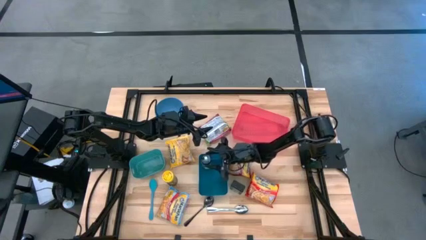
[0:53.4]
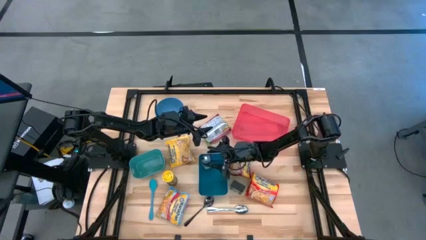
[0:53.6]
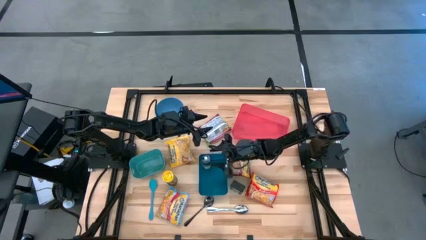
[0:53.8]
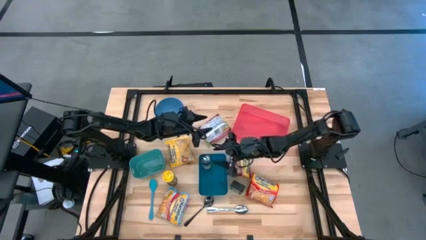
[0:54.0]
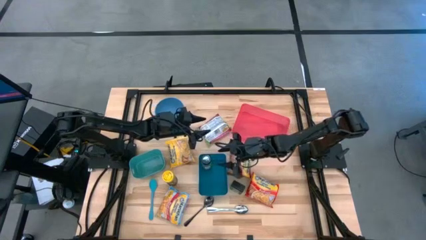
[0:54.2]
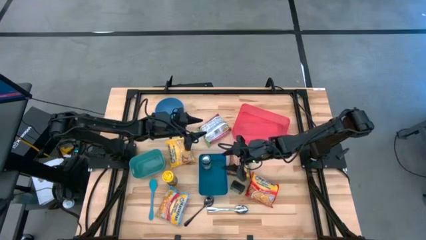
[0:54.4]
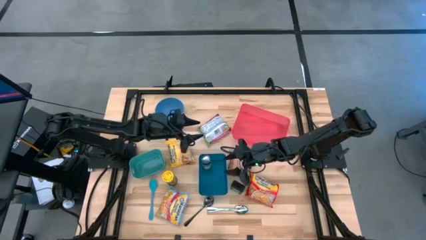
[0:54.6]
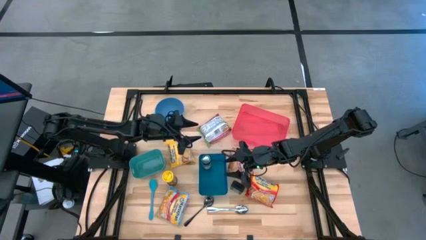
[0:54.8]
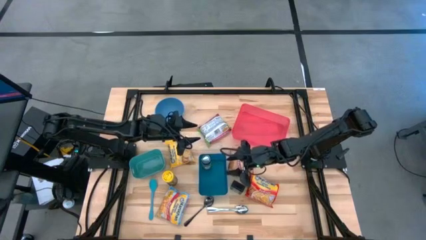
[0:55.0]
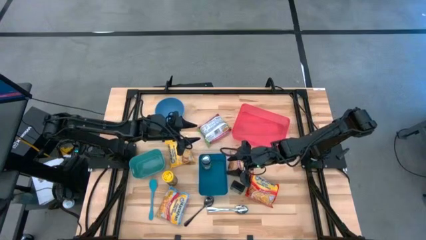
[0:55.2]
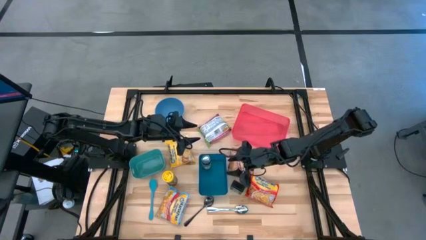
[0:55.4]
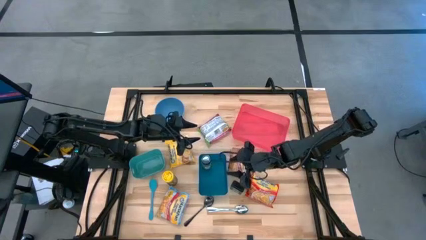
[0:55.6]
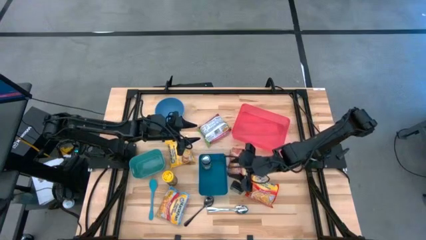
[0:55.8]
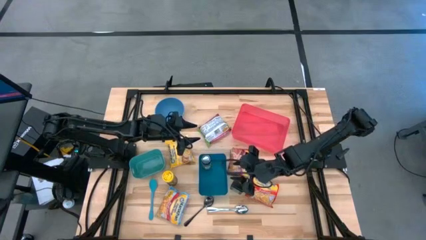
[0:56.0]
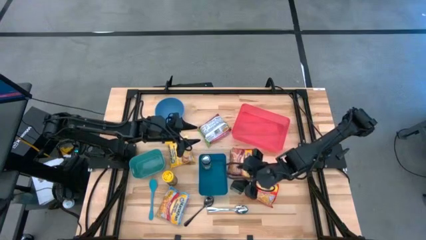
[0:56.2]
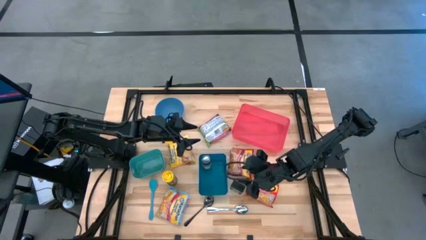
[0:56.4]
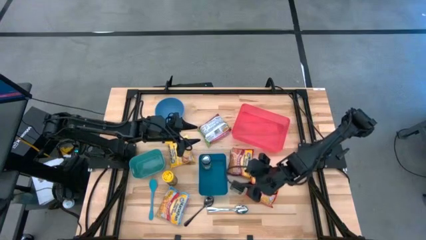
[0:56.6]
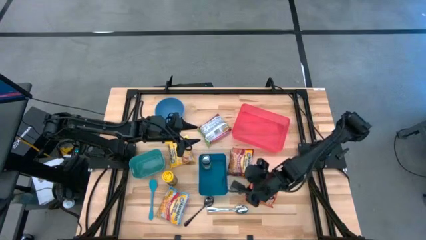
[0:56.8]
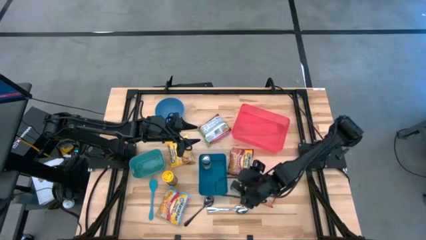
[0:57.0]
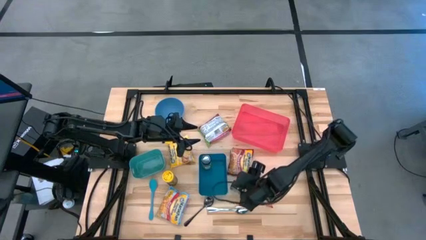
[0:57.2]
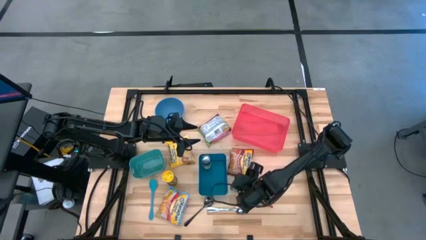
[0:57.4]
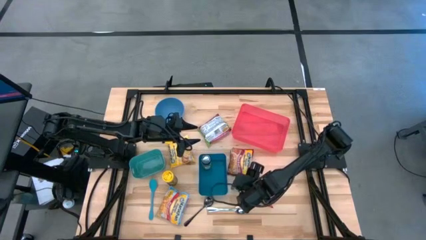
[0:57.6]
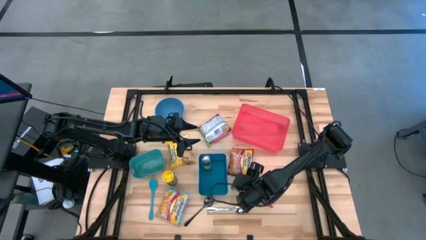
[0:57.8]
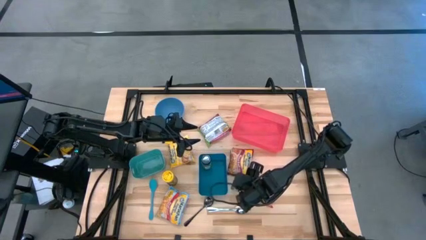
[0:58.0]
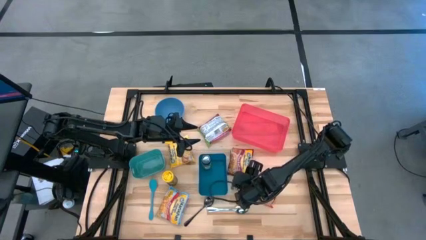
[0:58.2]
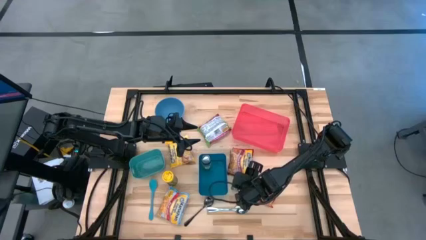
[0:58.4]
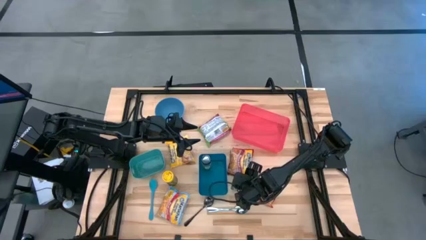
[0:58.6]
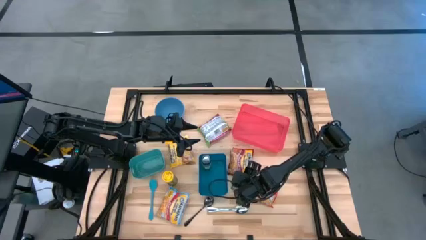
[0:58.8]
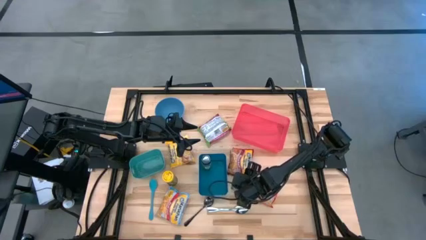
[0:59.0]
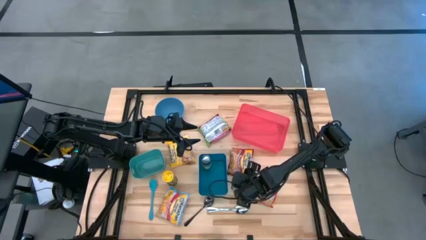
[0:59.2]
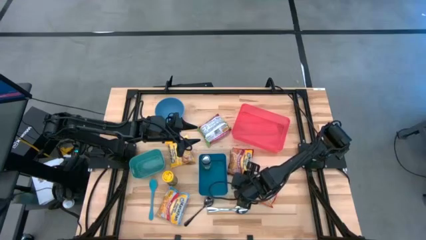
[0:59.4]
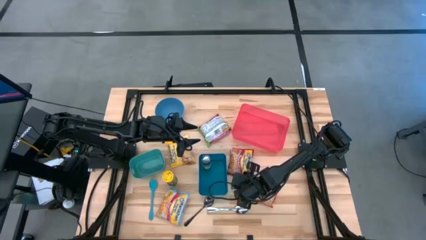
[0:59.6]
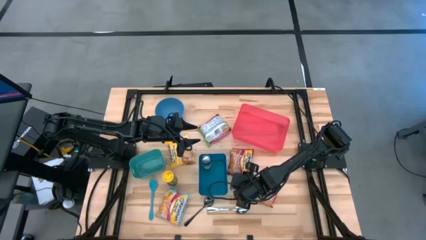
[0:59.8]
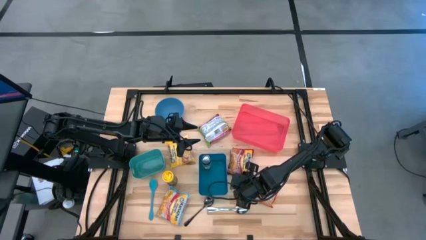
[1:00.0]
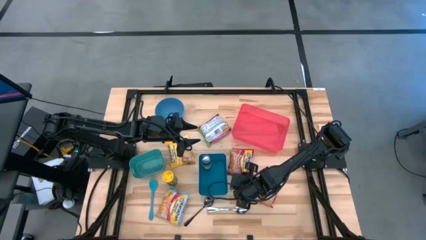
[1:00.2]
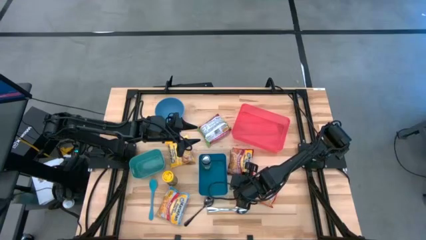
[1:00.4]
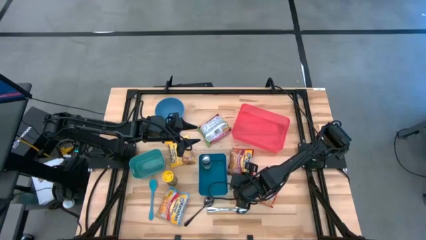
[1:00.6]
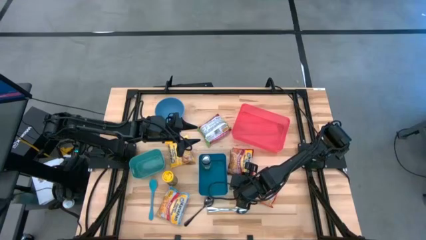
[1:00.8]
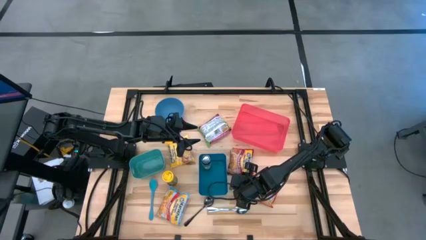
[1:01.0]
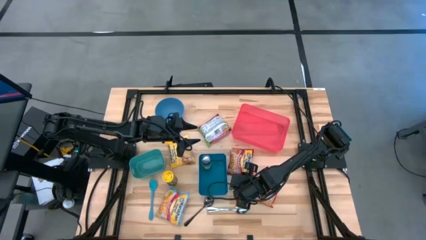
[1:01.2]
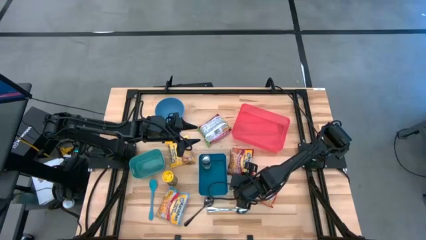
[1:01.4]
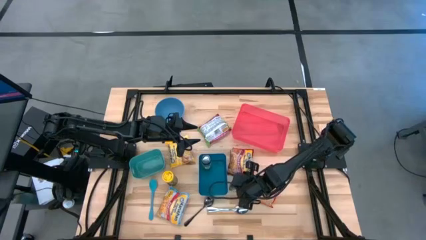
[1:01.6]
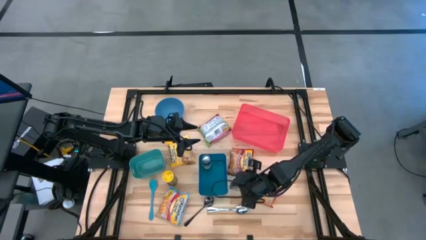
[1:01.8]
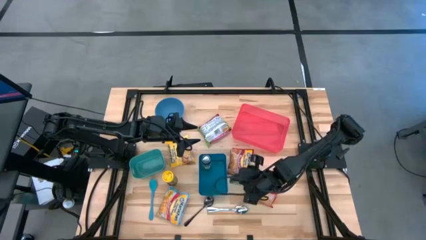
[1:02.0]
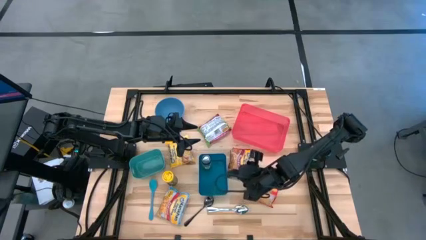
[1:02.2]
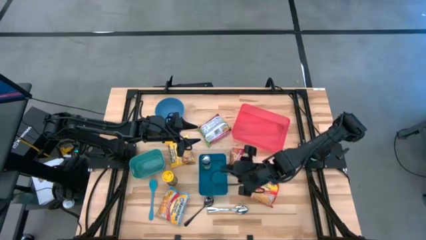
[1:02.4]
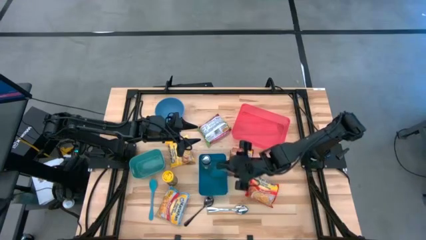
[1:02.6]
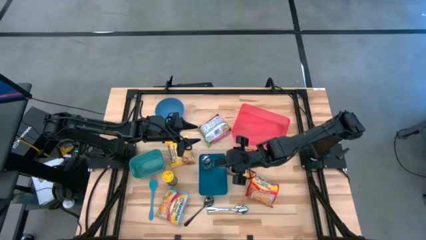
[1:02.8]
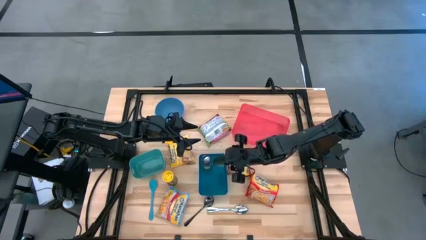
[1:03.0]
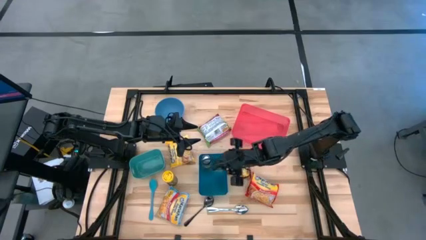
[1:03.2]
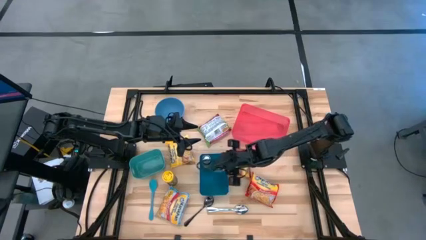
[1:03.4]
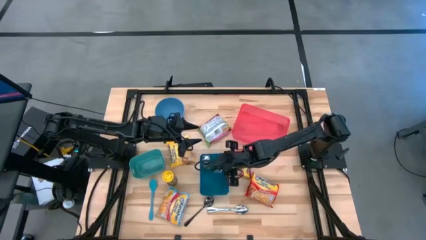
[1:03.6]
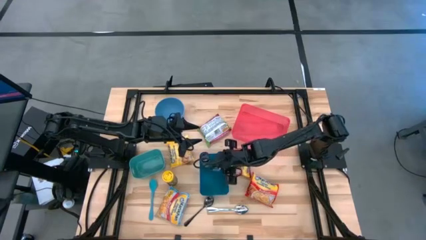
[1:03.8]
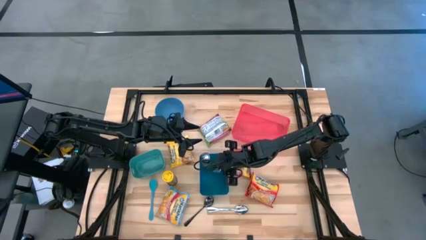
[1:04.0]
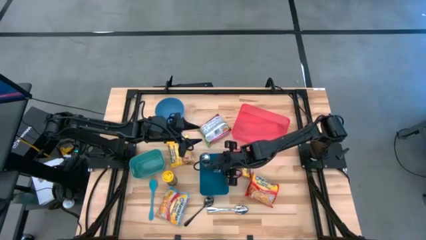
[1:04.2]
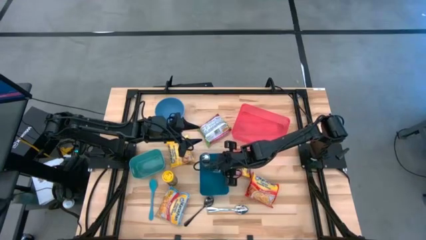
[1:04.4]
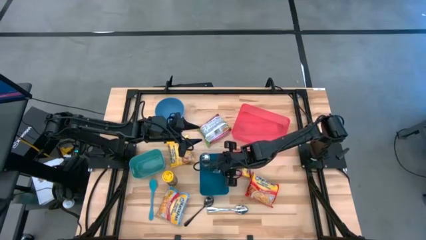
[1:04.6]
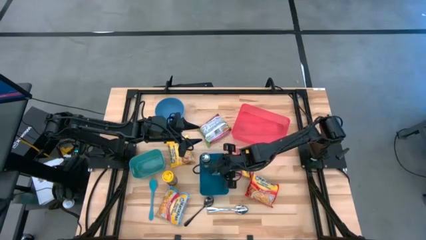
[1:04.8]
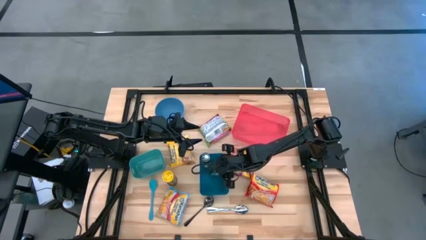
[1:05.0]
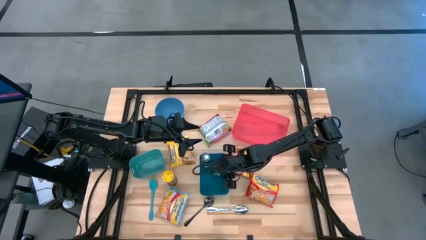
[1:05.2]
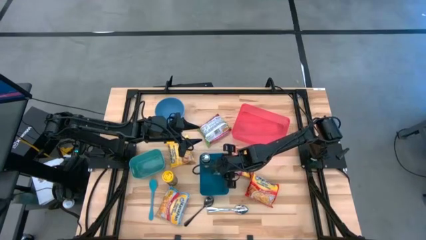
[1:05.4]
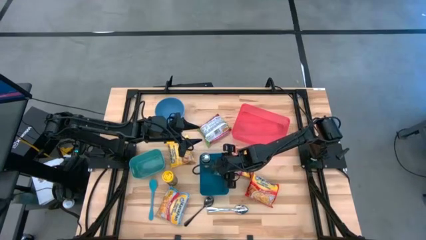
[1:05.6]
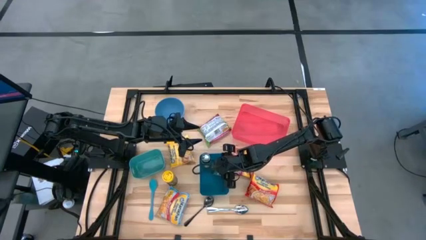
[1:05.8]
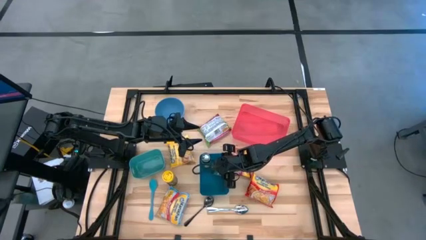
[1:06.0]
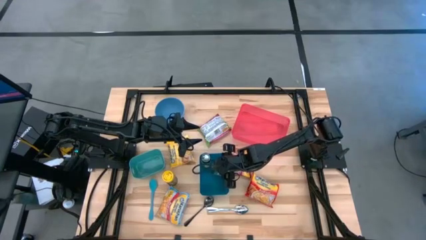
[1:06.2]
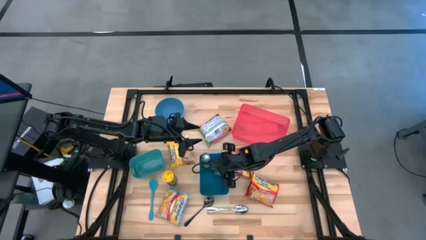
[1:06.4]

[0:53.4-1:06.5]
Task: Pick & Place Food Item
Put the black seasoning can into the blue bin

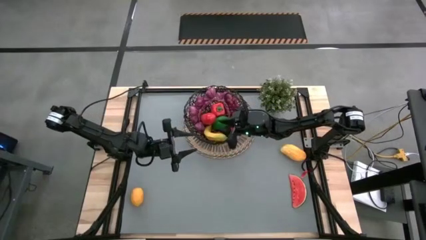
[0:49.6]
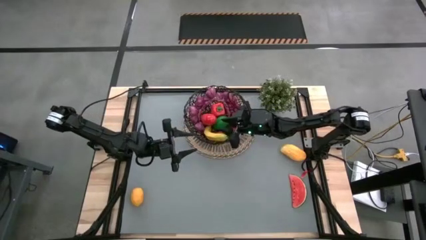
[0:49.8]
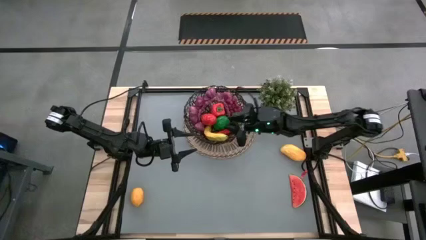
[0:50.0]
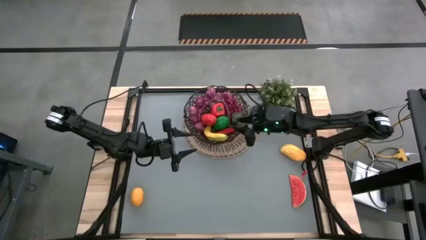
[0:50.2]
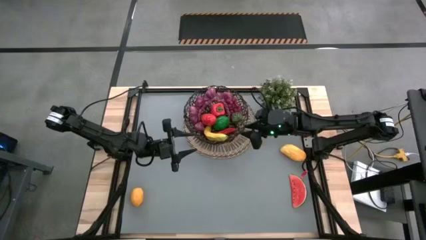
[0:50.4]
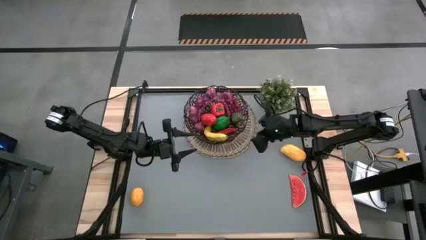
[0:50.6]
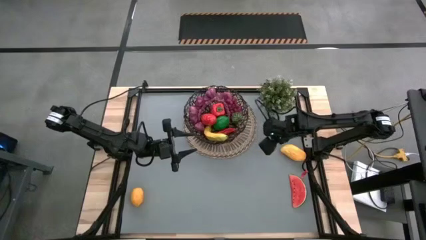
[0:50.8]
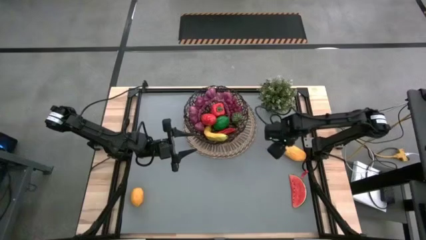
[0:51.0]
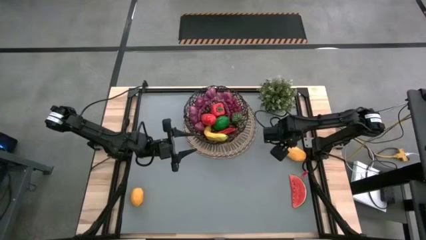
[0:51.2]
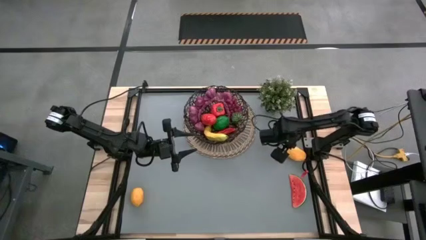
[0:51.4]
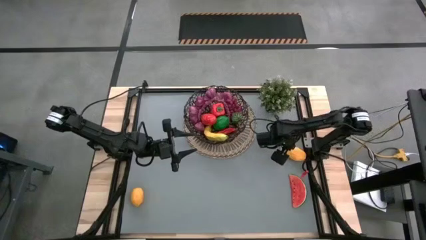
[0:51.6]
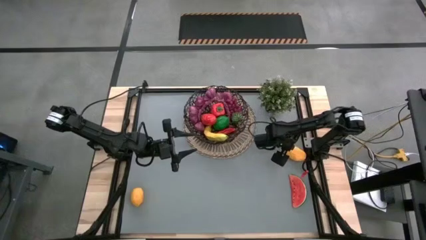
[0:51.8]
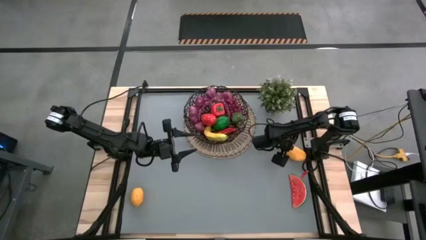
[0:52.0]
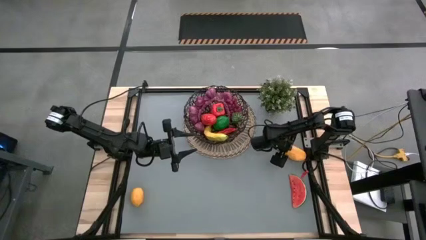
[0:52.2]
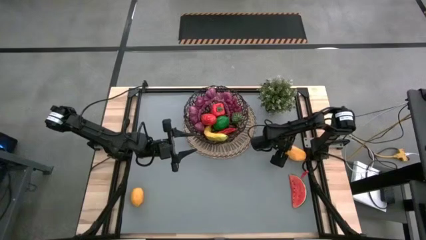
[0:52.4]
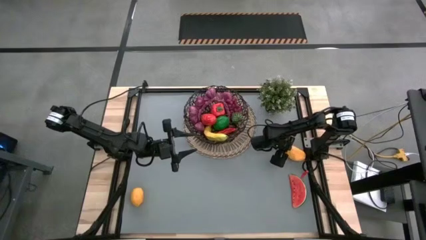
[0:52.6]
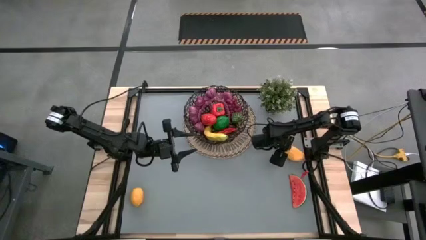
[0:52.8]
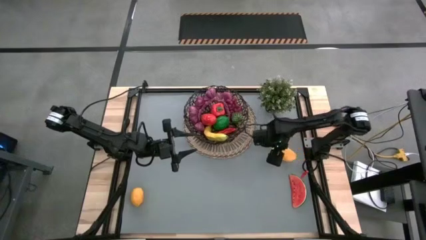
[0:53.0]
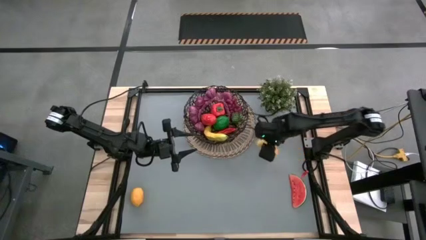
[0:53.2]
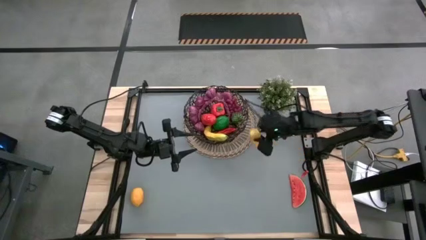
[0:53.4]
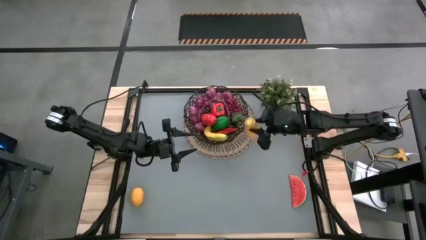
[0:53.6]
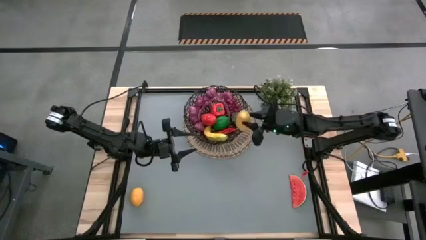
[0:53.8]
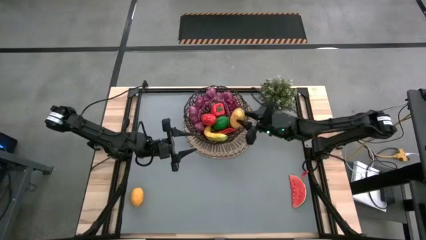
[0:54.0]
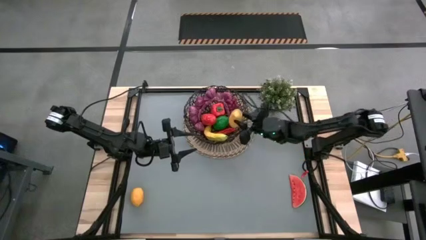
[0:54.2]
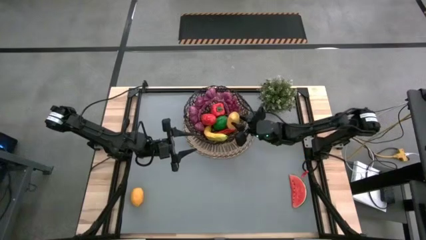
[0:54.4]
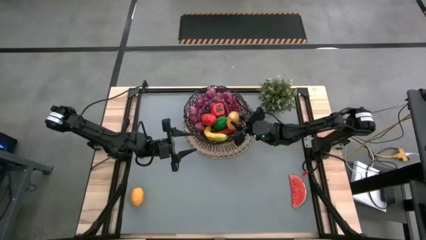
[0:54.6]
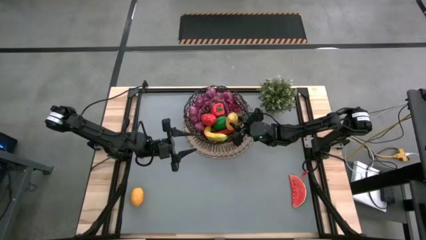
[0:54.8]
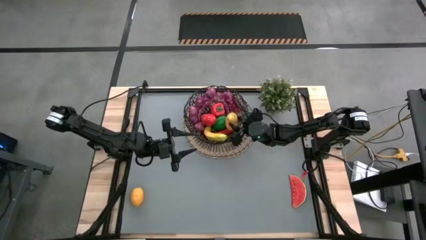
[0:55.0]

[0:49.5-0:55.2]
Task: Build produce basket
Put the yellow mango into the basket
